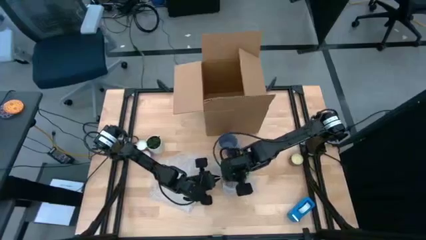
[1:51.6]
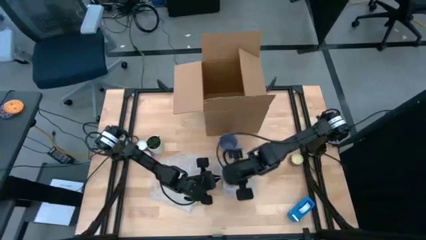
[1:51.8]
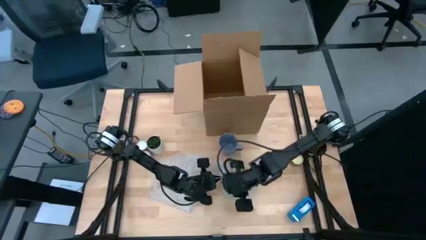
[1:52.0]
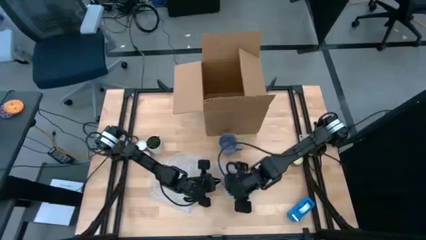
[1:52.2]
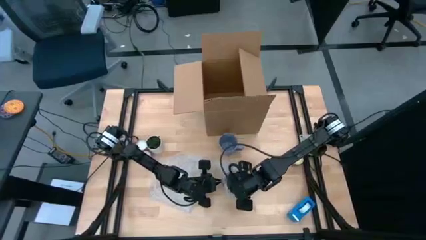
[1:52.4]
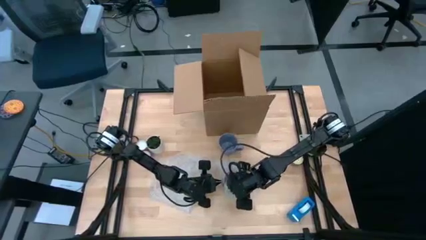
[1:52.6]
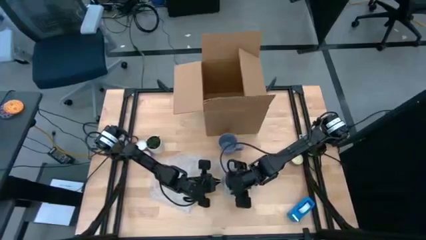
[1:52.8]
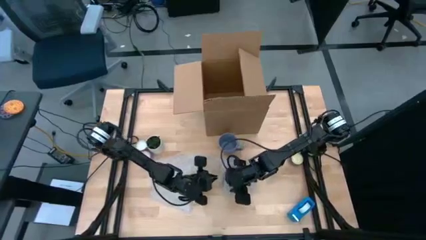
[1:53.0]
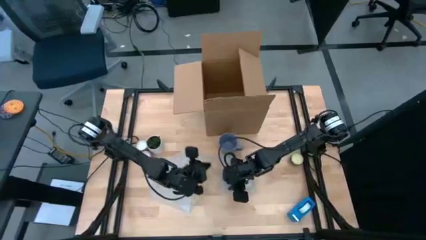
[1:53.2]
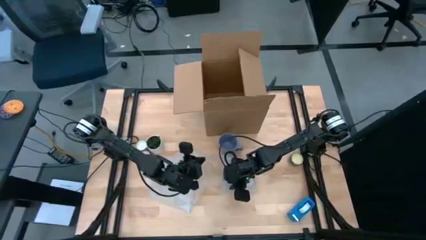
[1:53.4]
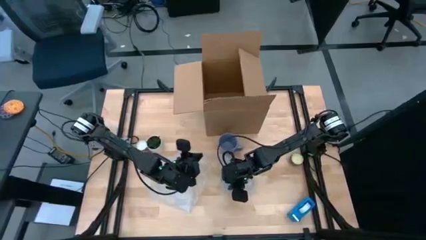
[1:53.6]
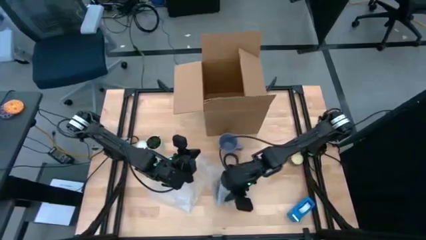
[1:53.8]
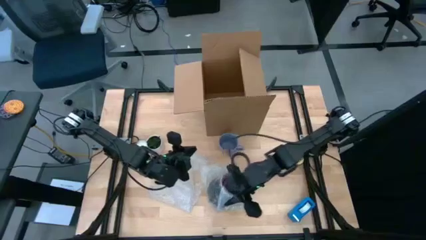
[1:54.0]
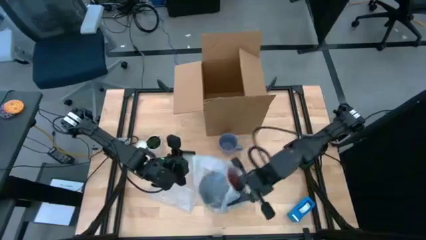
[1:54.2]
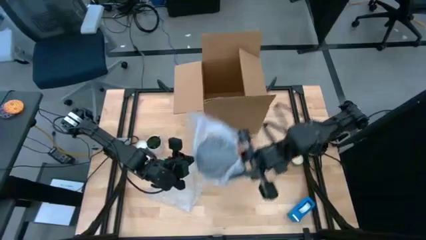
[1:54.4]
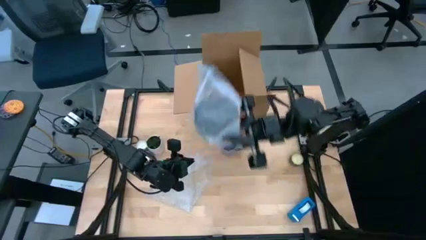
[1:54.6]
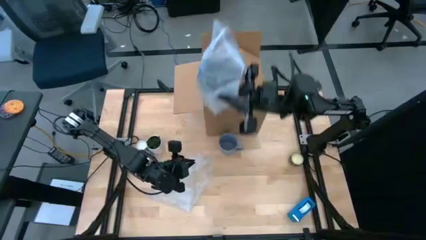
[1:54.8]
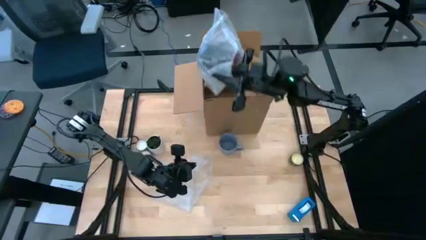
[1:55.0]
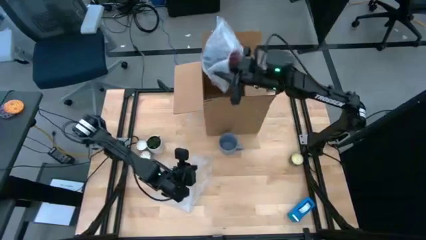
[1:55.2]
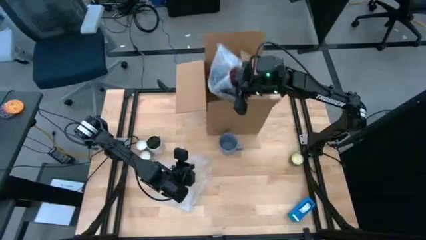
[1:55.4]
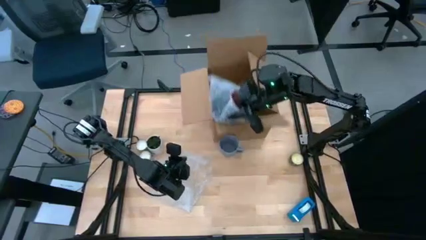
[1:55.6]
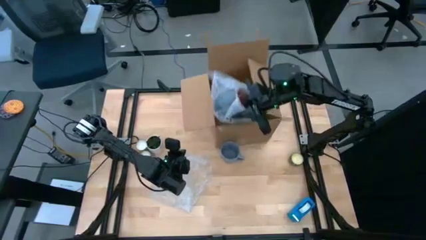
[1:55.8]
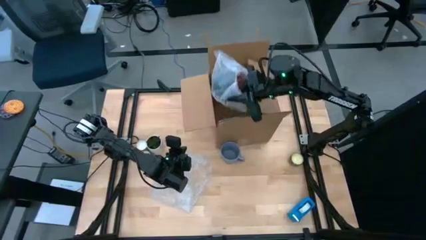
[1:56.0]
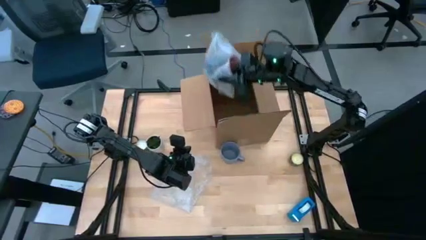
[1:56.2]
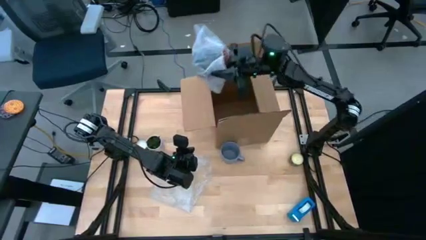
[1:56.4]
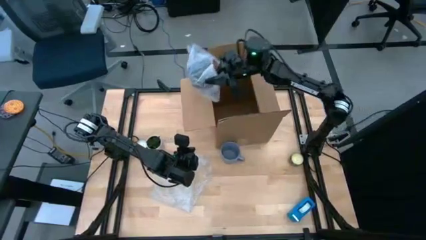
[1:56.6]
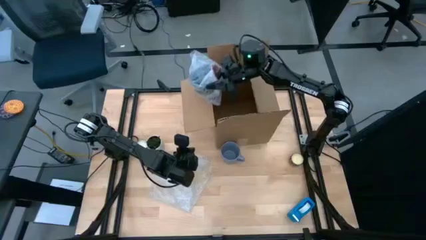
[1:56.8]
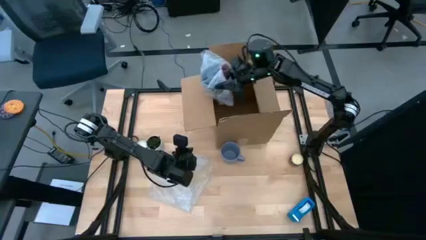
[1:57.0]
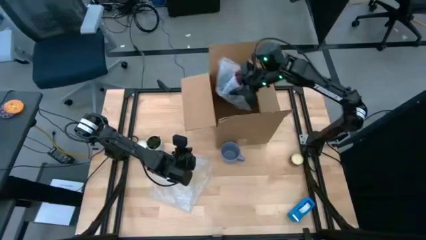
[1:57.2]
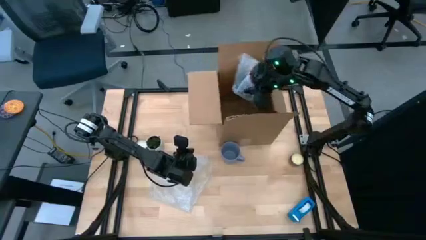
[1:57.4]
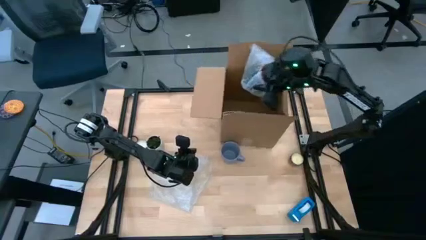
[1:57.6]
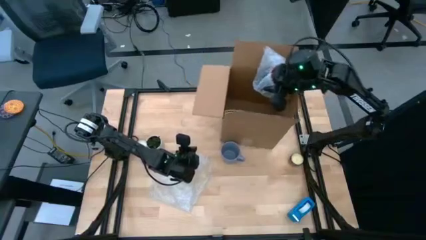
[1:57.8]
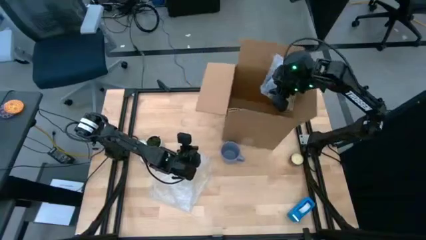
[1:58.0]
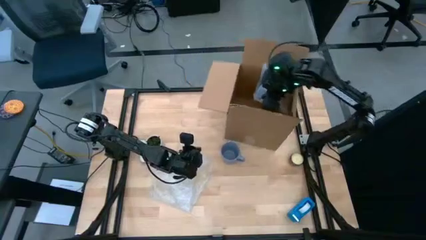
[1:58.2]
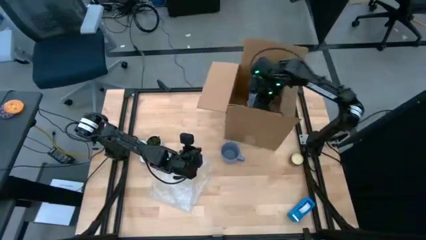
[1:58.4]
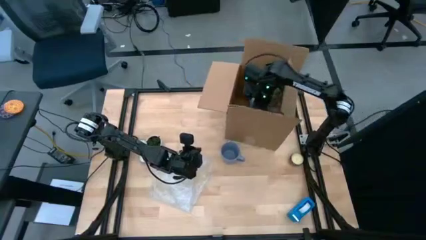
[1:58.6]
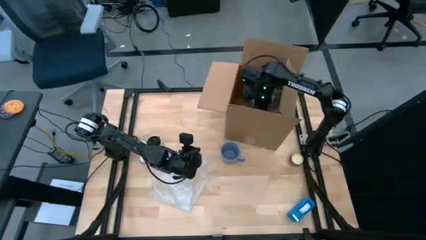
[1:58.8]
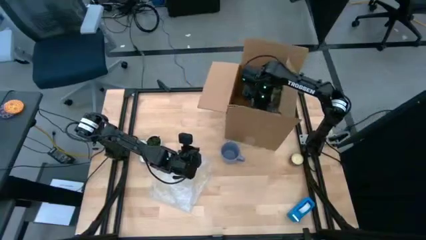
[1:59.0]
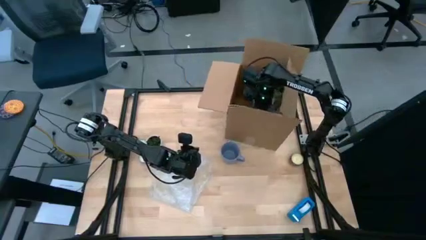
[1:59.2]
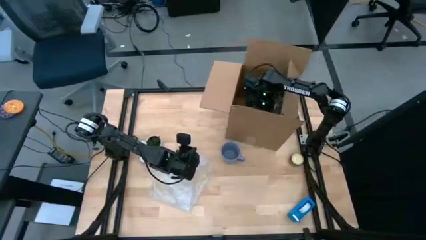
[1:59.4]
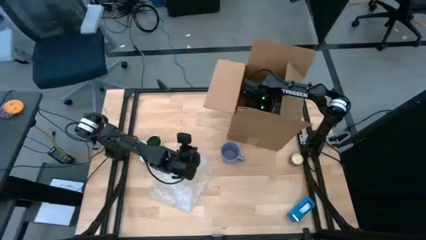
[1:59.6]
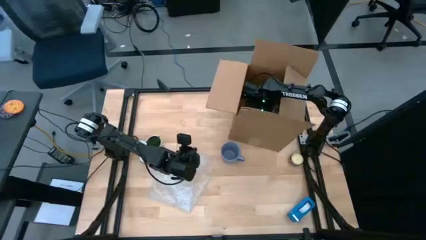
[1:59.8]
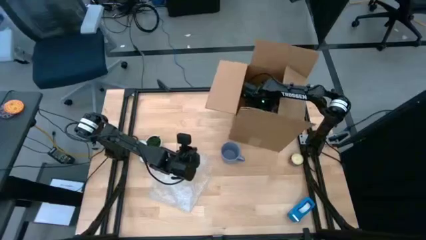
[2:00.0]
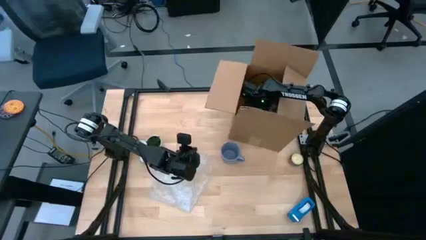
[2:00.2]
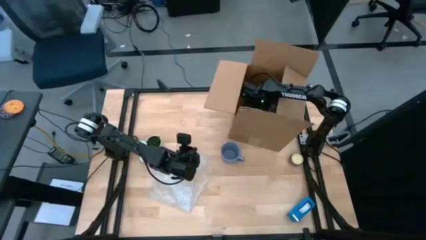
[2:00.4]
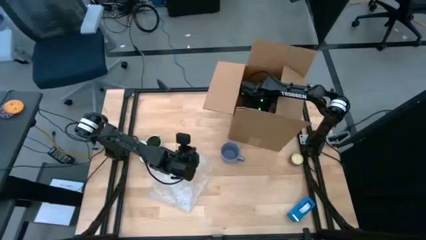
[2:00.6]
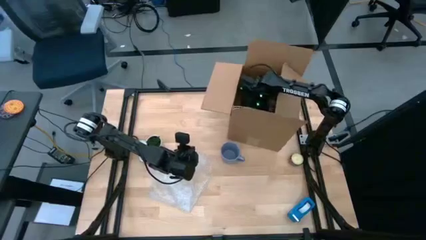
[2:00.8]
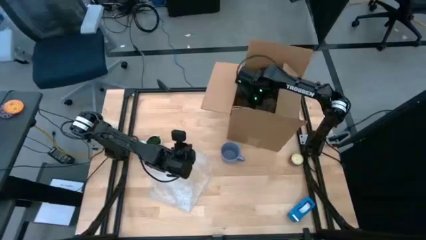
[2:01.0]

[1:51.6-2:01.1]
Task: wrap mug
Put the wrapped mug into the box

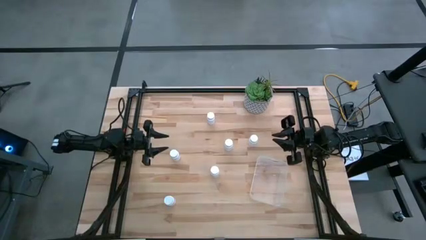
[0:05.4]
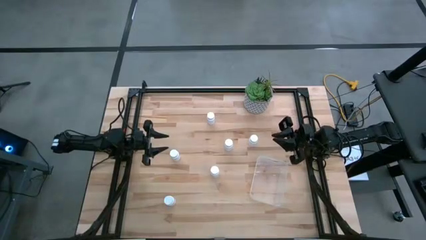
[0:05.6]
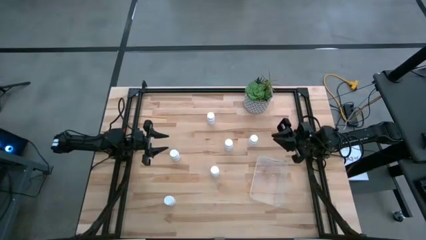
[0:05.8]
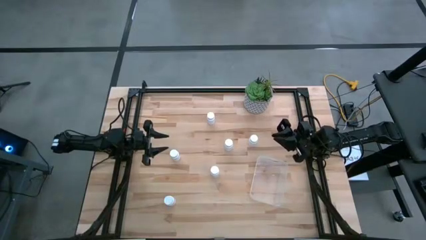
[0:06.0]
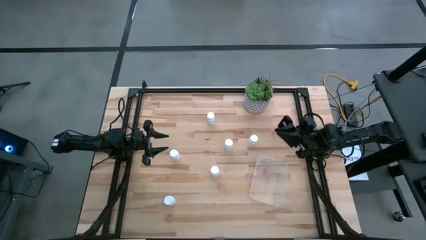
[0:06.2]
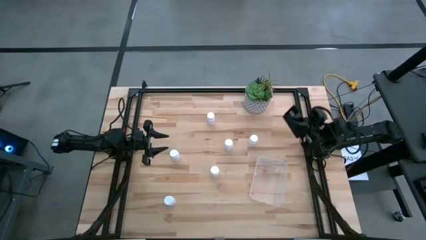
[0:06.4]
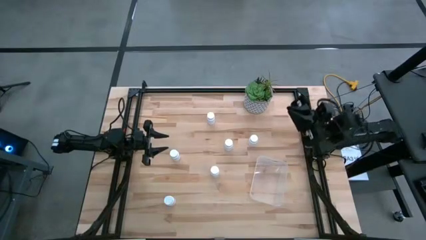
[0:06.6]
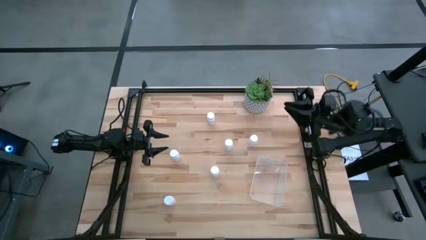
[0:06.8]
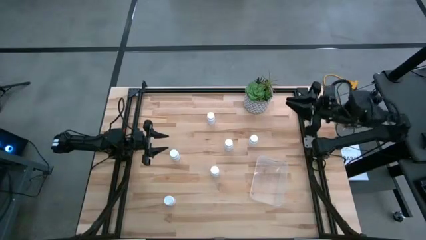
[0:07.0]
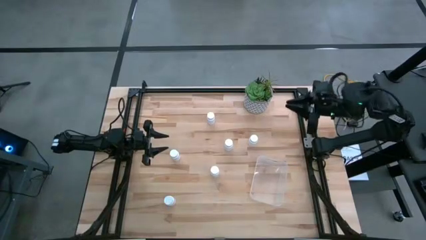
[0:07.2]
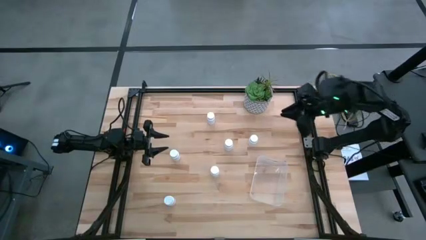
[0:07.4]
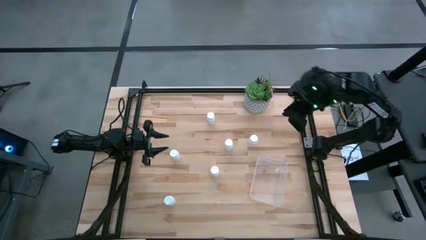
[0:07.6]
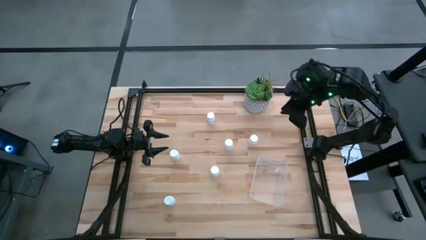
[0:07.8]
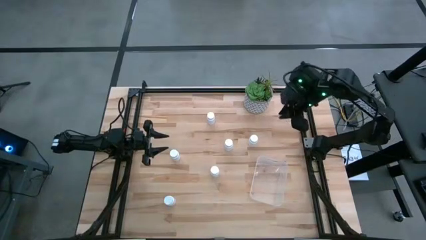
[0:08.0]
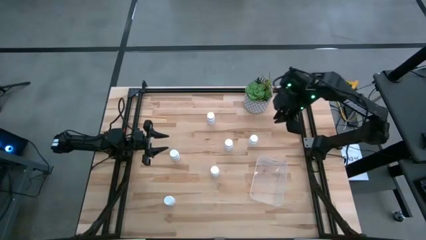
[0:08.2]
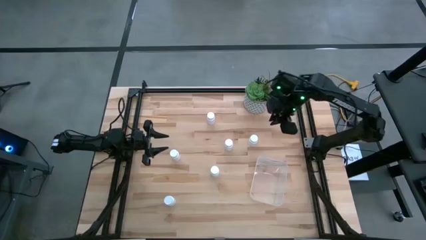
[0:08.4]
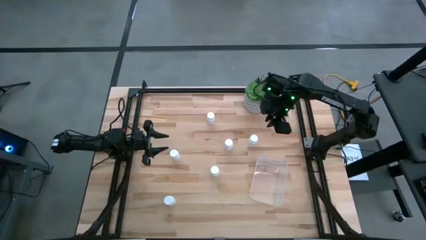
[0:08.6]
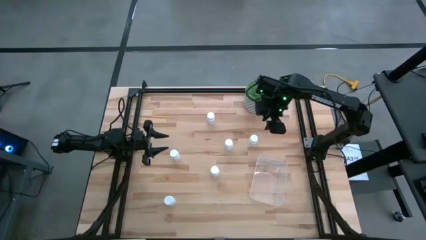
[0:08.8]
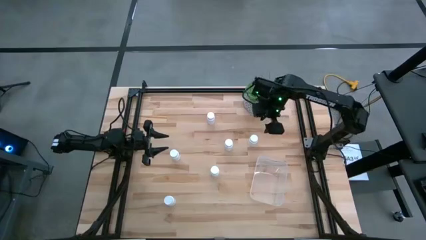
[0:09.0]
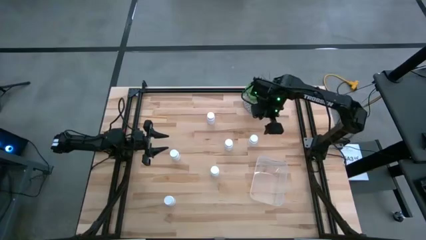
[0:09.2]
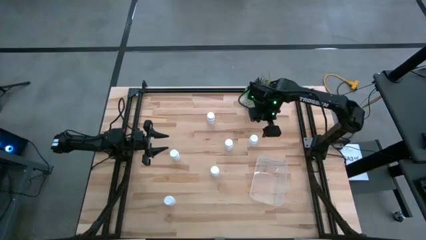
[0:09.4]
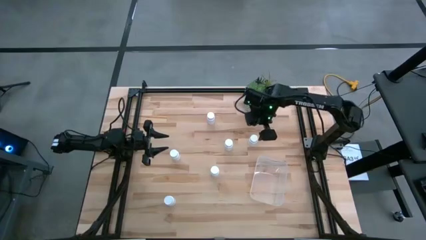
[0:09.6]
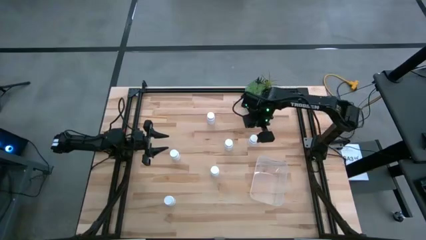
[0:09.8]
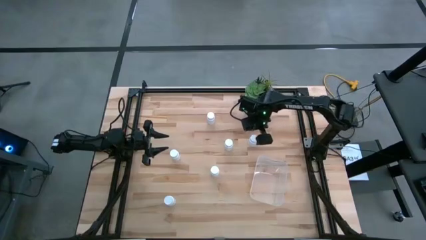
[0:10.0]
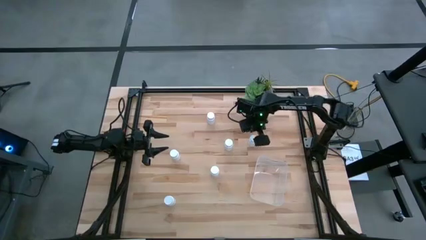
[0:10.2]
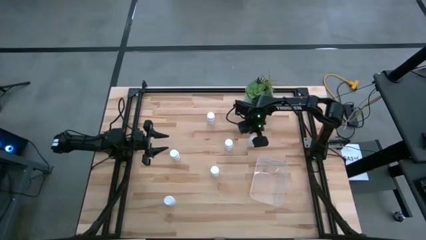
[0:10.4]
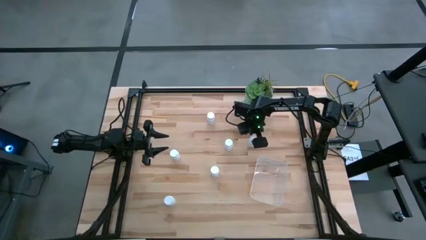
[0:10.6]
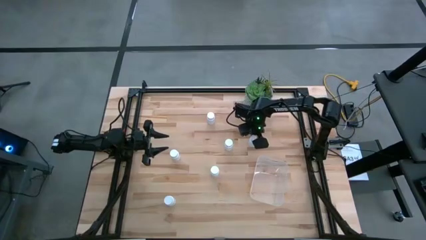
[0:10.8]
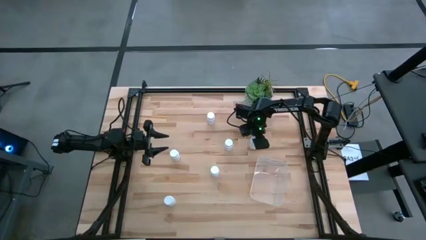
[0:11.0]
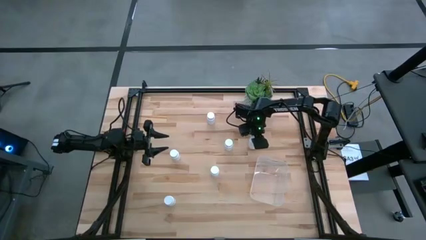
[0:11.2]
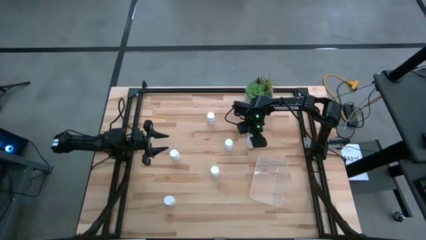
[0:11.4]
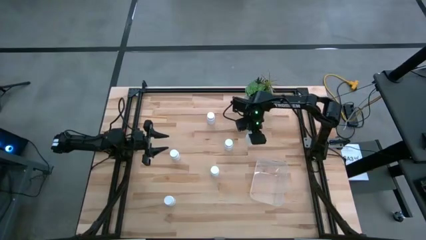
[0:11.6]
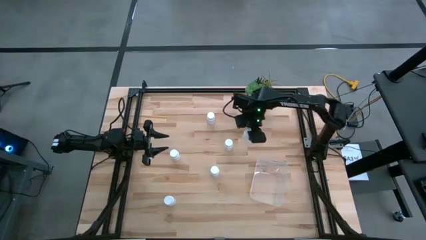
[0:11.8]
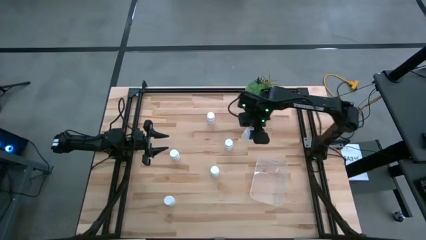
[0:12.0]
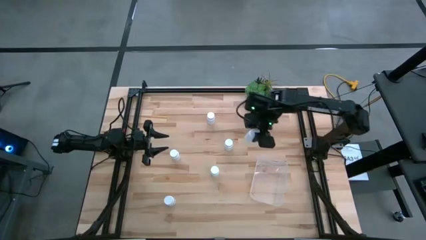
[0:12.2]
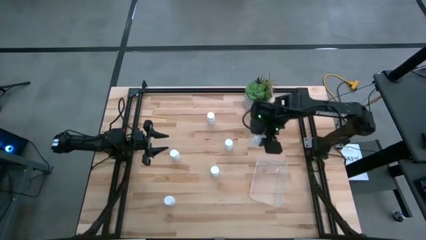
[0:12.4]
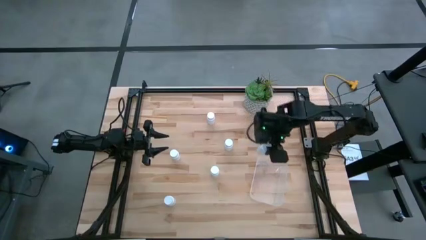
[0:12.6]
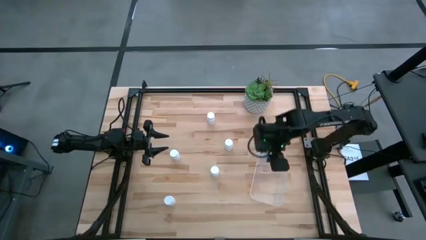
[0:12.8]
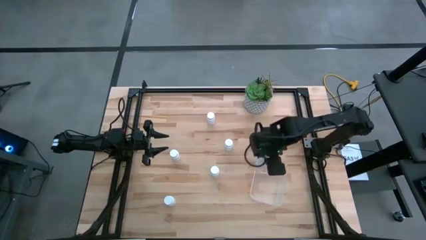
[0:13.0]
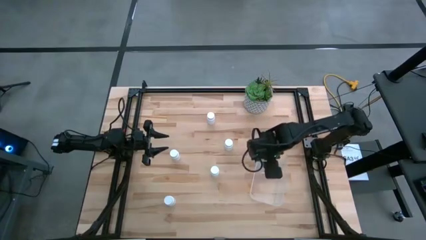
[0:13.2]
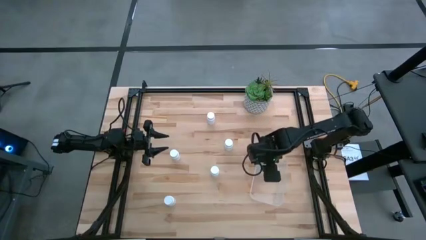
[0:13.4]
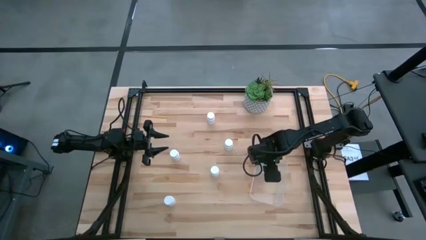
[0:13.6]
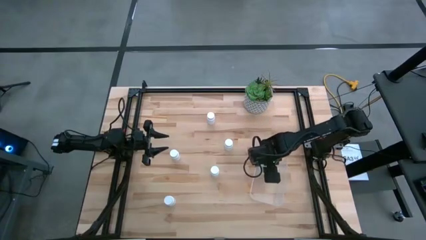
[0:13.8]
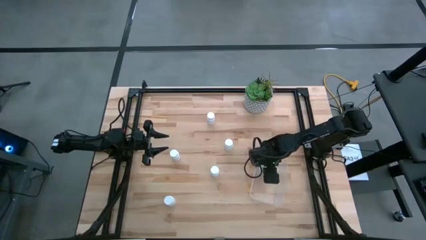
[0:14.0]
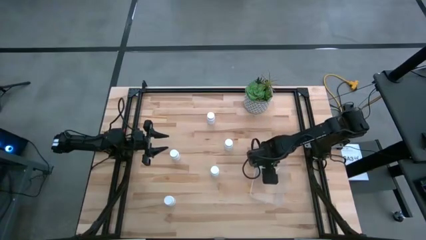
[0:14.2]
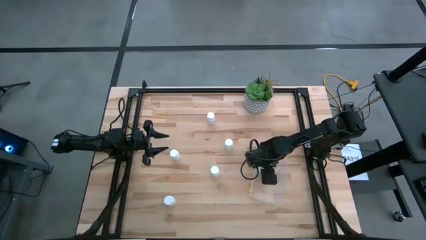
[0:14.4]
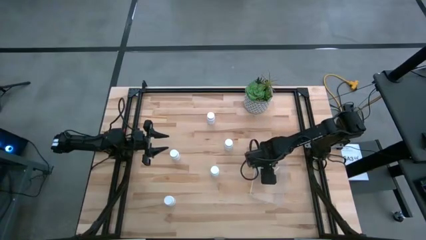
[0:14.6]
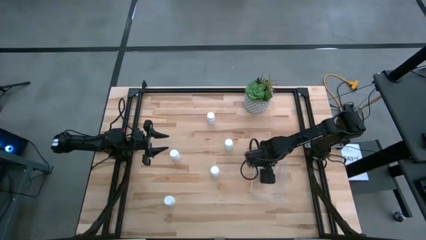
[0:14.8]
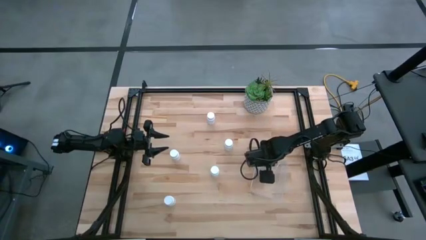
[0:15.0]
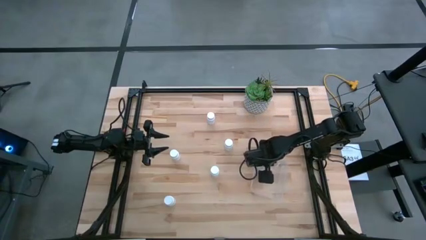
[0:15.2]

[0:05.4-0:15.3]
Task: Pick and place pill bottles into a basket
Put the white medicine bottle into the transparent bin
